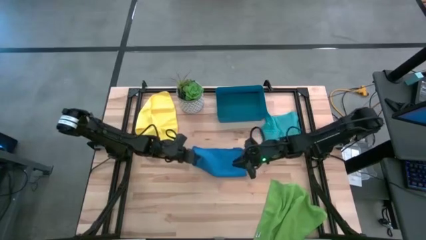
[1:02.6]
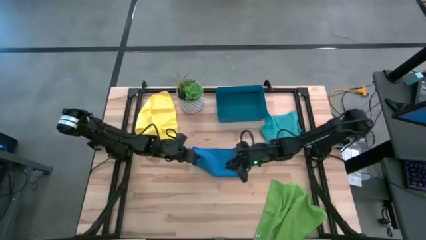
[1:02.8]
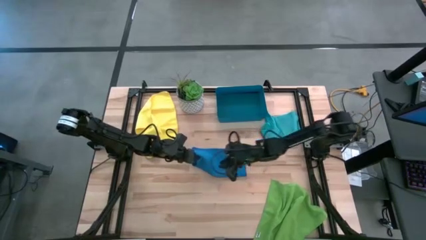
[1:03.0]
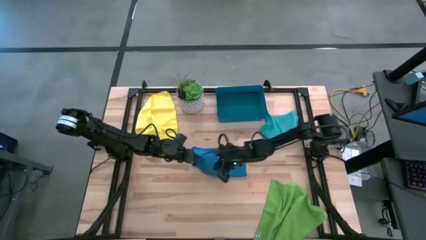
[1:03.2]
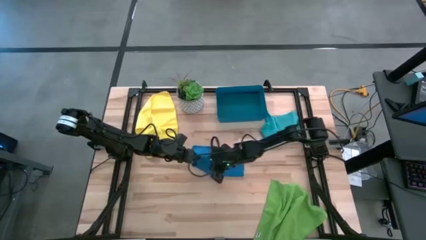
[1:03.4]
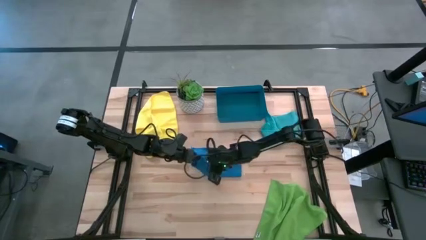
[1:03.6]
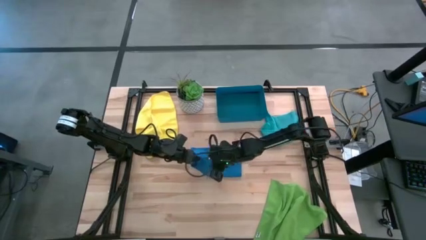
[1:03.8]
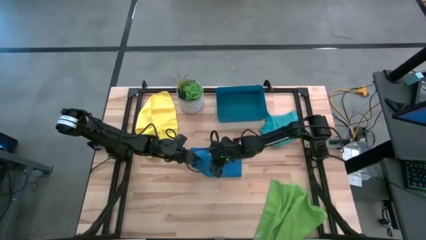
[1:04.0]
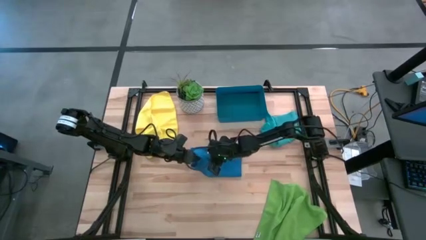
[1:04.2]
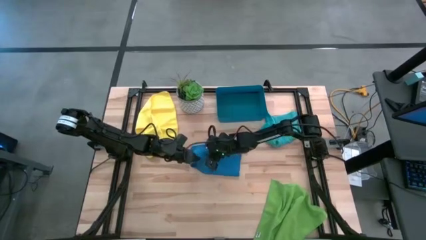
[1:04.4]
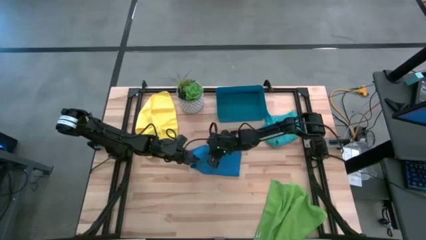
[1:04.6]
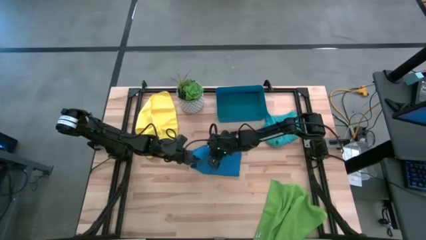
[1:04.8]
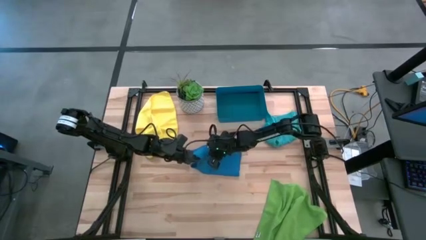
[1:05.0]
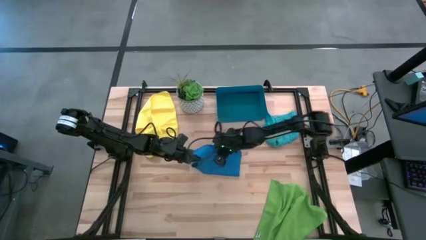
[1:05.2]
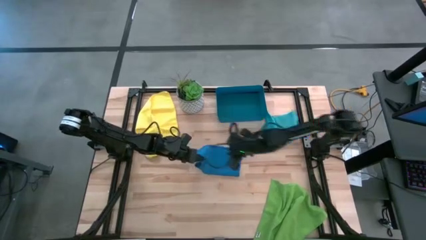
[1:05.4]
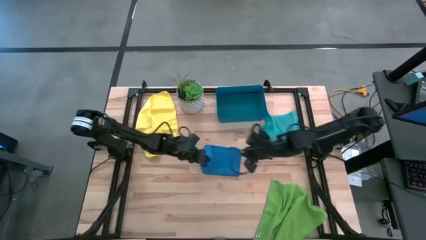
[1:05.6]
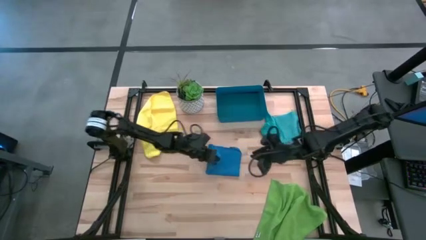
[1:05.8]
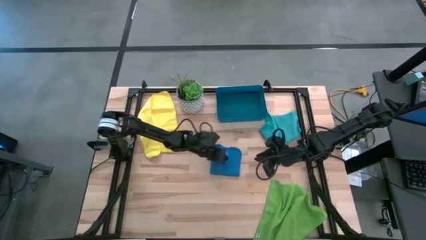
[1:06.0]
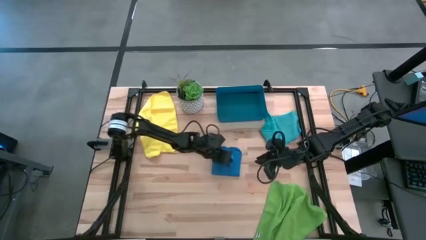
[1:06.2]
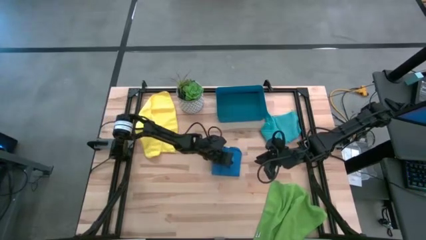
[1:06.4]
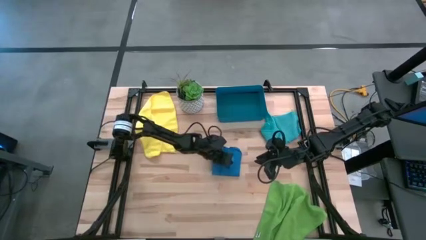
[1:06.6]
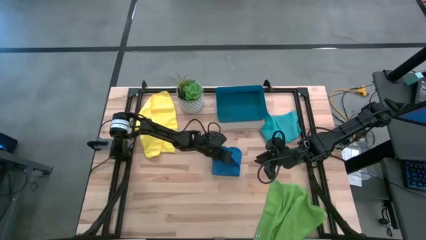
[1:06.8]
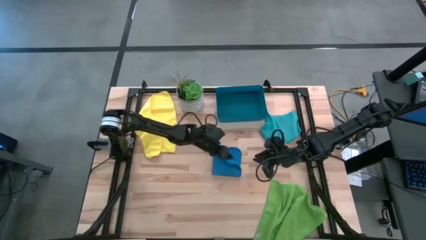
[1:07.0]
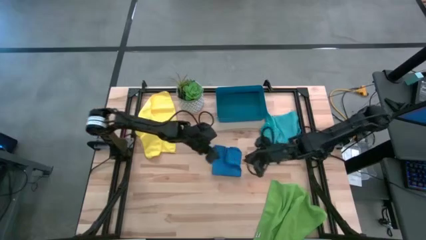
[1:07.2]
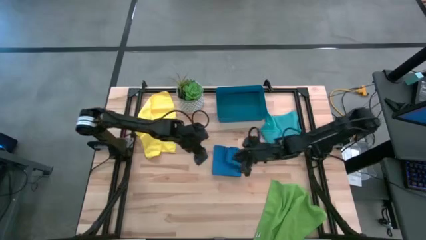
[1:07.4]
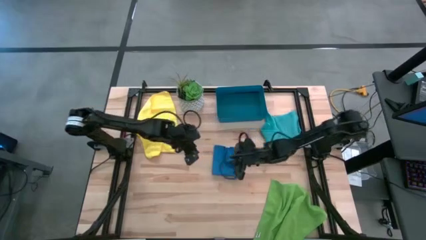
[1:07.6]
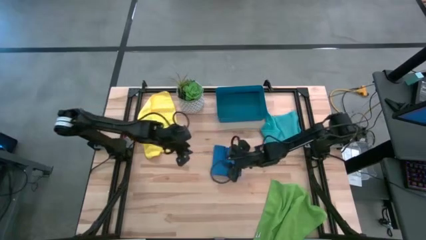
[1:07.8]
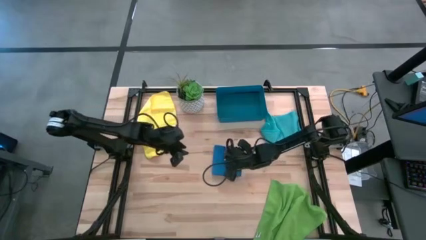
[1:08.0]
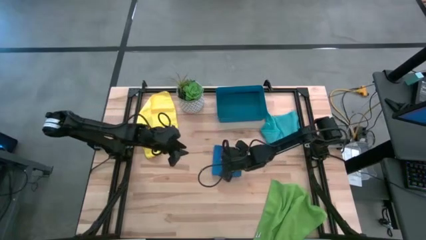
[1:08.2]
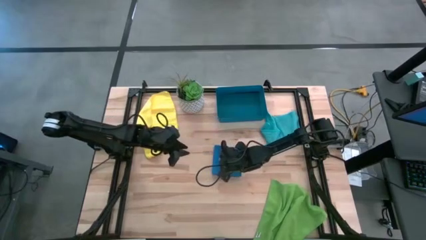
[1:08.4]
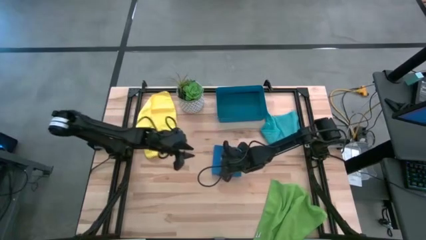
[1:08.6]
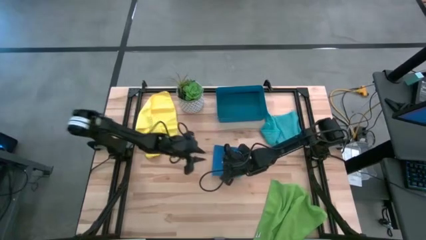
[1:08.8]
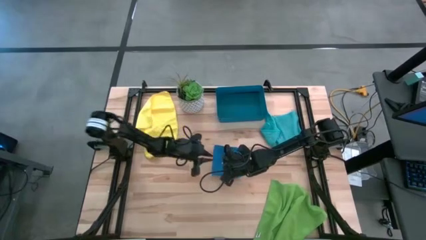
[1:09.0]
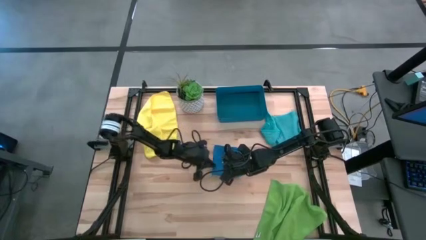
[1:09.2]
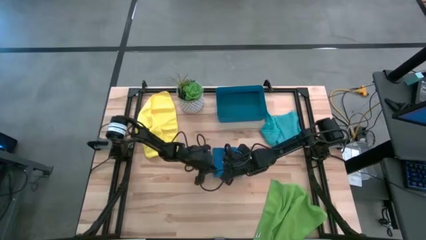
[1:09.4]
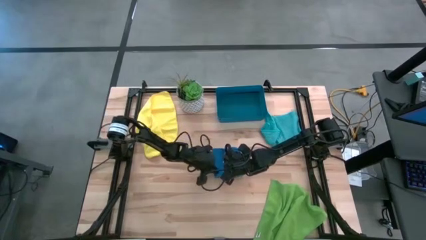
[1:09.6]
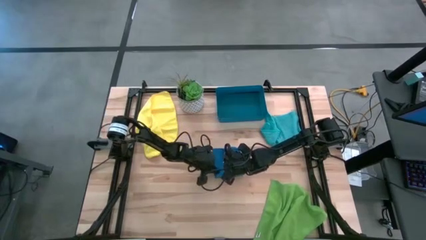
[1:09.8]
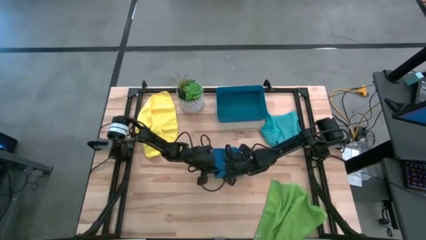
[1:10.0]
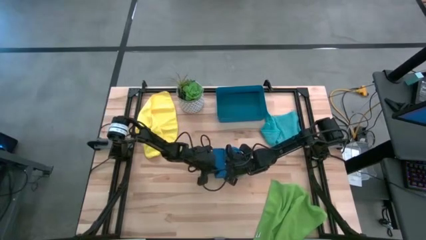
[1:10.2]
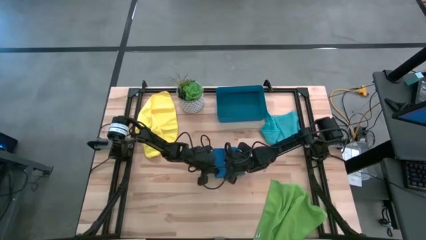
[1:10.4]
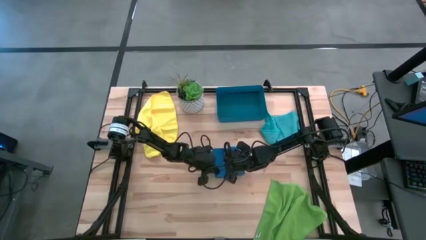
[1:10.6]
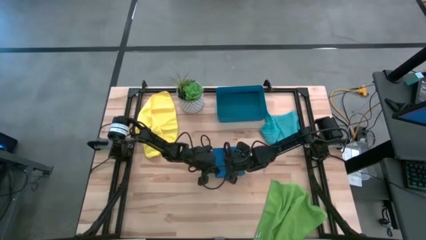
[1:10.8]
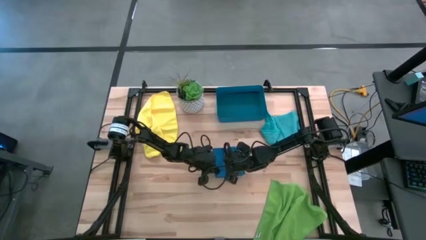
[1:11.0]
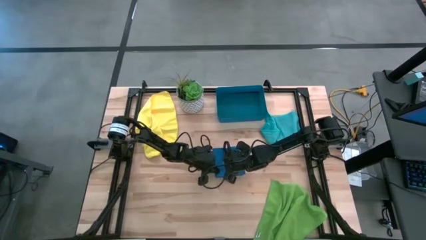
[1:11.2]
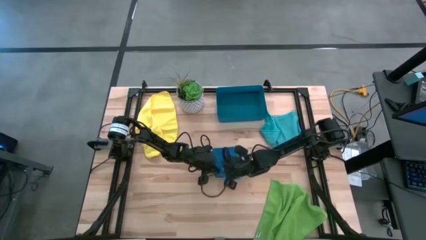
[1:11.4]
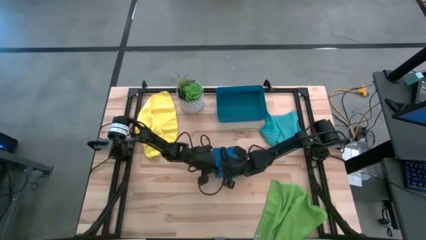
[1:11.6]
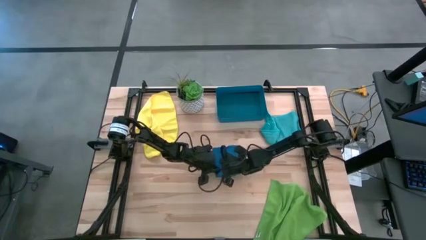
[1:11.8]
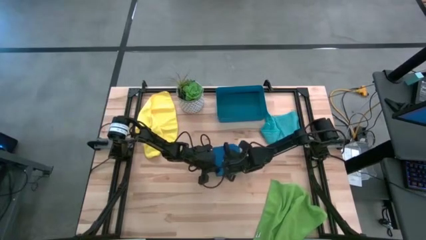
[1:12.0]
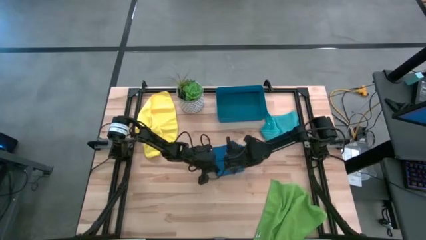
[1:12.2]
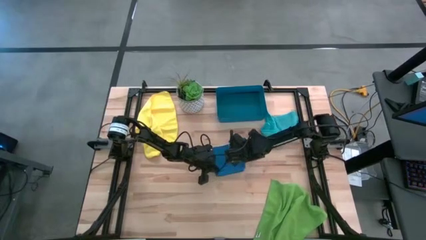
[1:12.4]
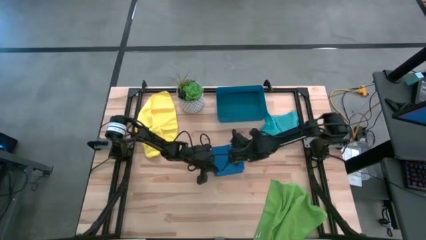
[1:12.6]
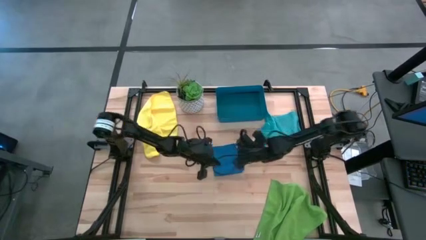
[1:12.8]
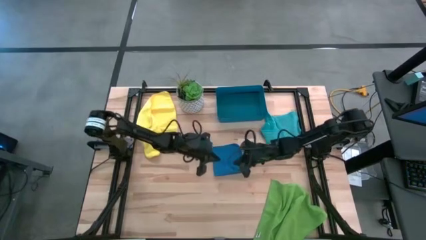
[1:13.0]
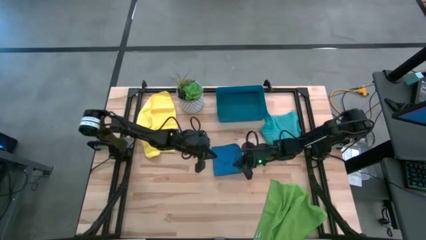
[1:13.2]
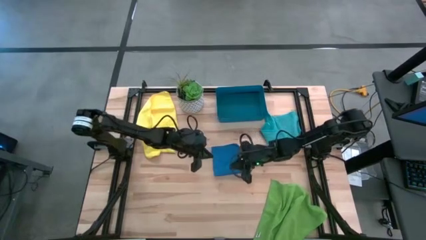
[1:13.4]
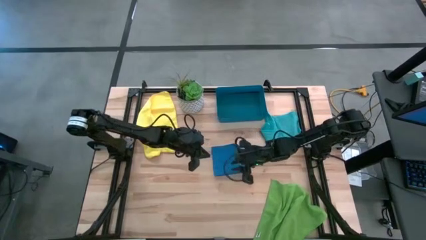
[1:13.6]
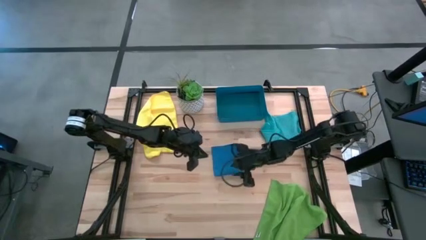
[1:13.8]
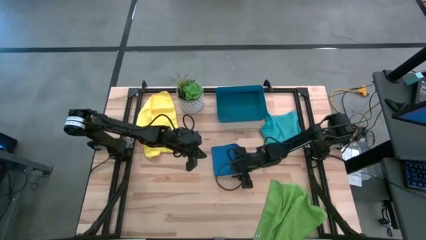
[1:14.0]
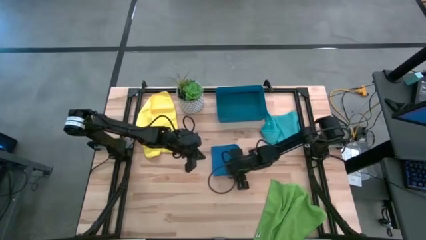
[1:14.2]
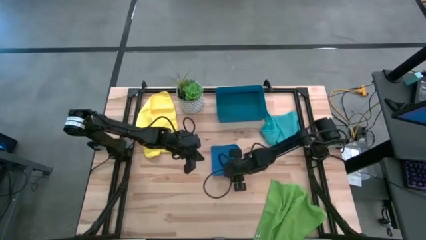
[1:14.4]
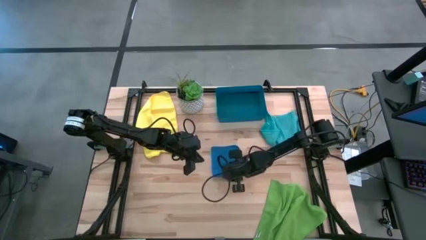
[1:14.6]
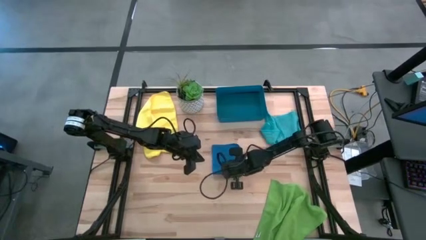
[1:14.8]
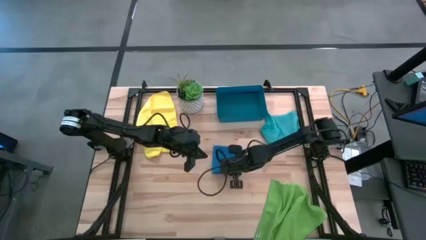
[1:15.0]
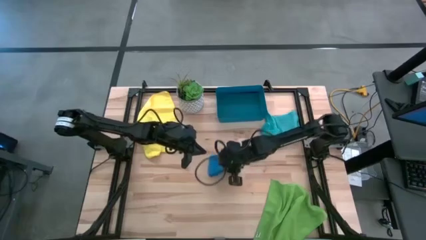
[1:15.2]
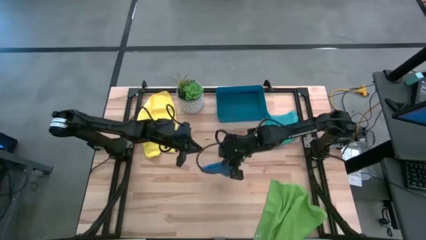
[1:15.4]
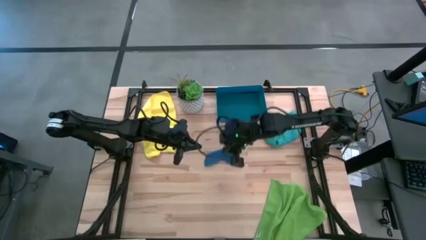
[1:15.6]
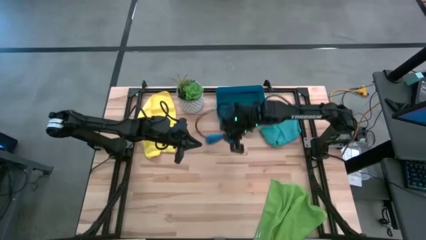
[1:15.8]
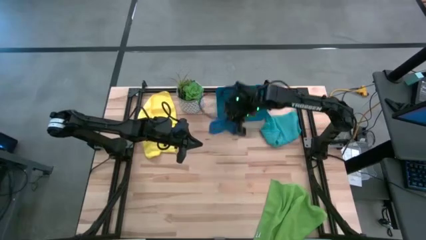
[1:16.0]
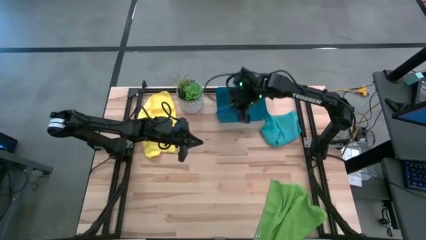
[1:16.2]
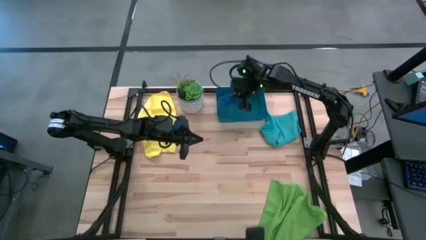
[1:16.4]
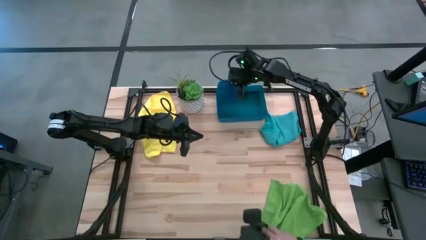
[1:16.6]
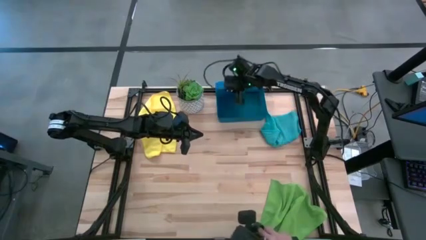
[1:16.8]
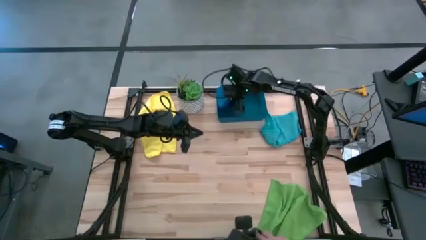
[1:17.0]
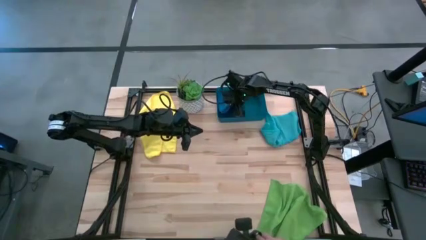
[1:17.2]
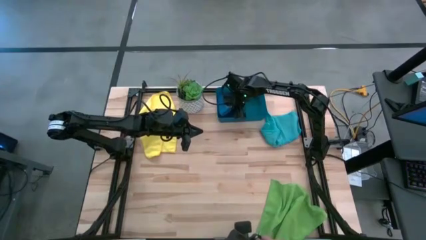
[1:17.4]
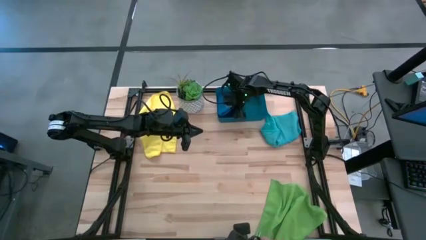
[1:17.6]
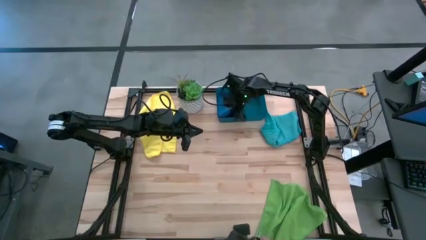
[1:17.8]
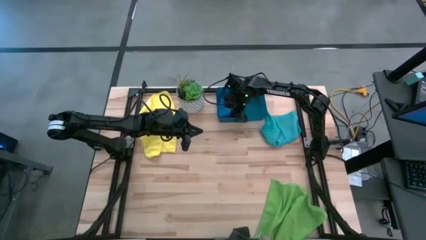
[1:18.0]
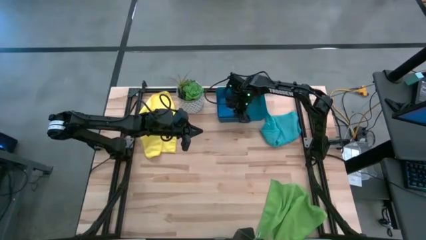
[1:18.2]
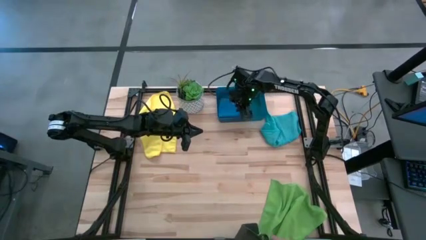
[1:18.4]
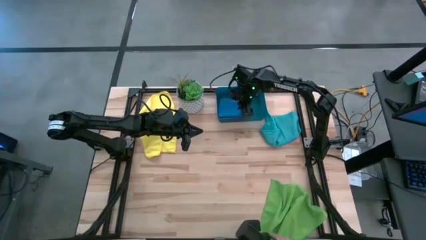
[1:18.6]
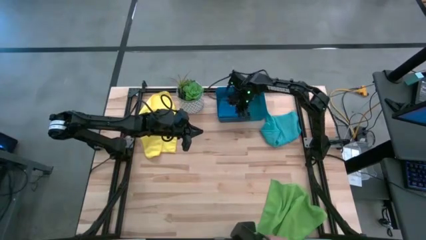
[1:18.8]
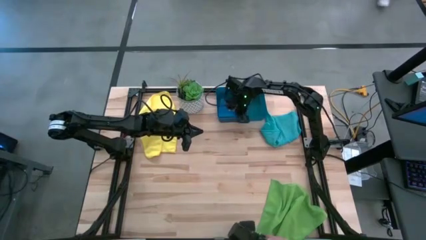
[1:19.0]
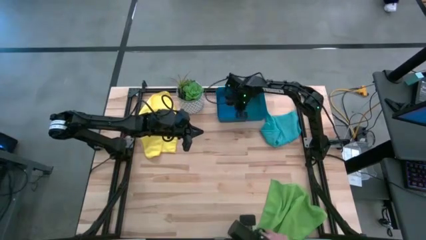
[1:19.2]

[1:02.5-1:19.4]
Task: Fold microfiber towels
Fold the dark blue microfiber towel into the dark blue bin
